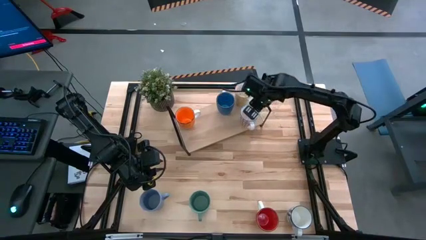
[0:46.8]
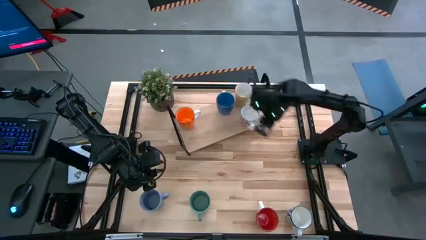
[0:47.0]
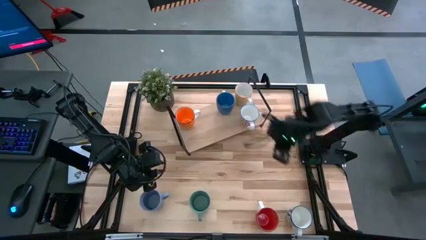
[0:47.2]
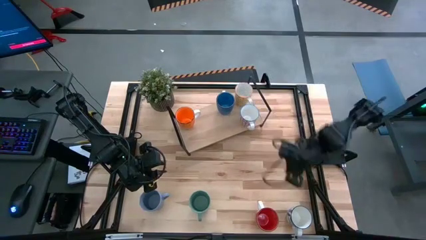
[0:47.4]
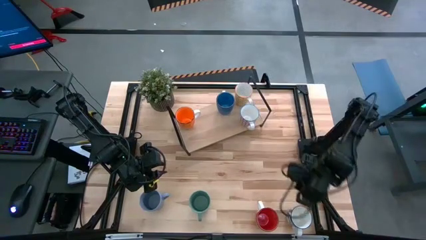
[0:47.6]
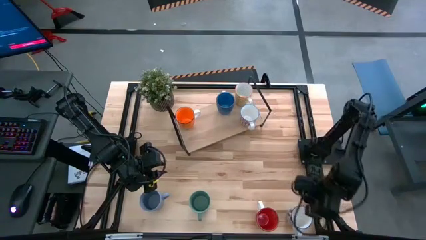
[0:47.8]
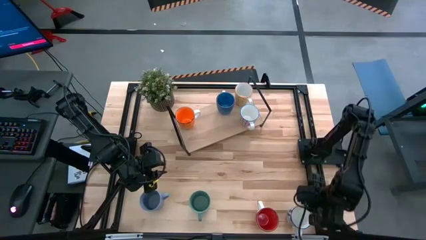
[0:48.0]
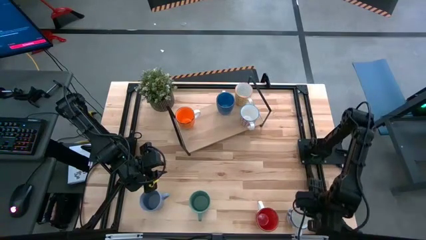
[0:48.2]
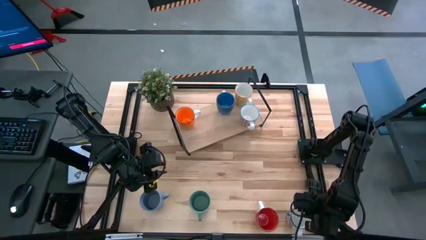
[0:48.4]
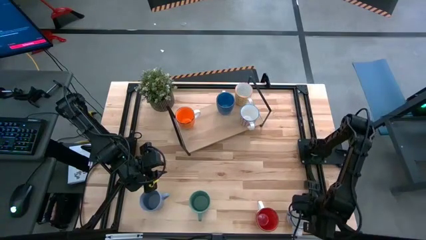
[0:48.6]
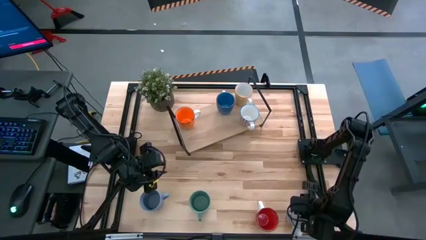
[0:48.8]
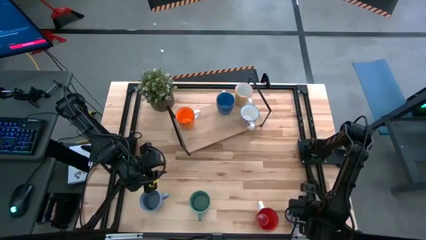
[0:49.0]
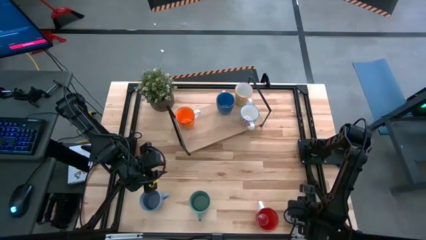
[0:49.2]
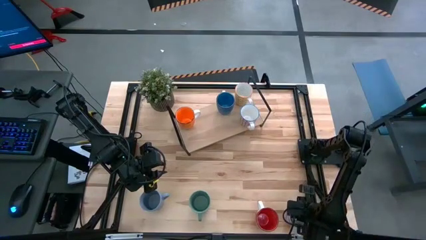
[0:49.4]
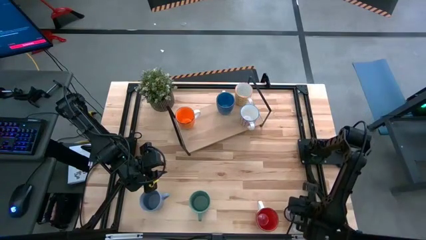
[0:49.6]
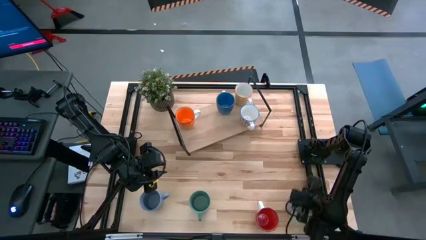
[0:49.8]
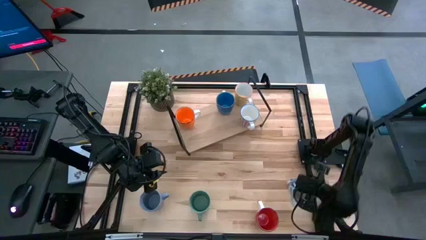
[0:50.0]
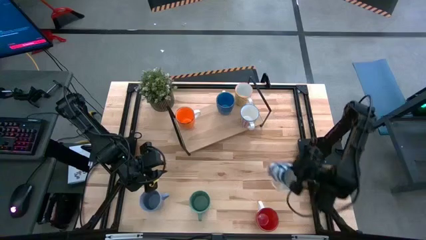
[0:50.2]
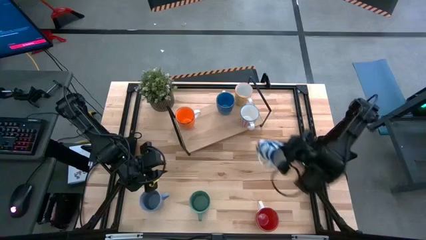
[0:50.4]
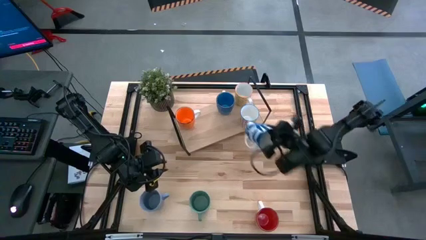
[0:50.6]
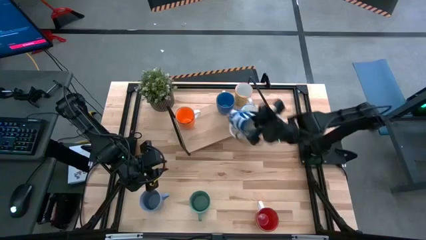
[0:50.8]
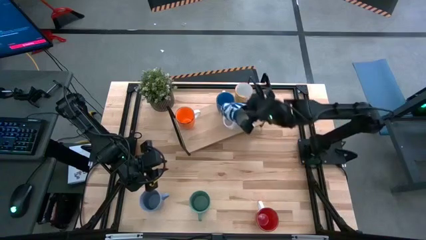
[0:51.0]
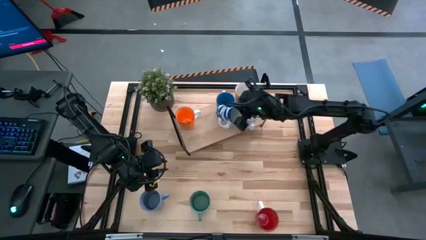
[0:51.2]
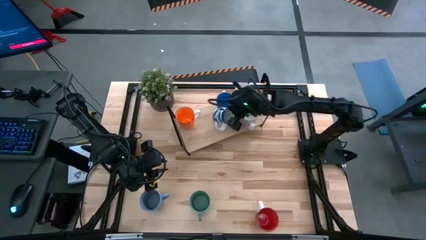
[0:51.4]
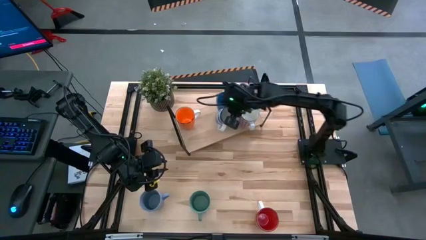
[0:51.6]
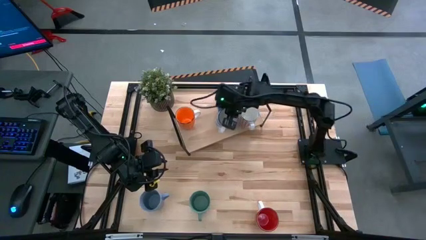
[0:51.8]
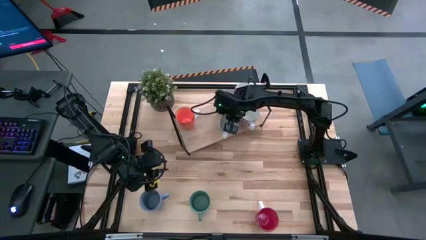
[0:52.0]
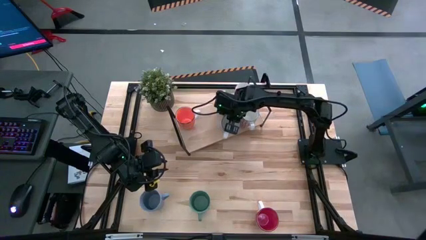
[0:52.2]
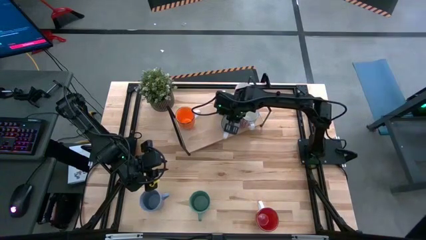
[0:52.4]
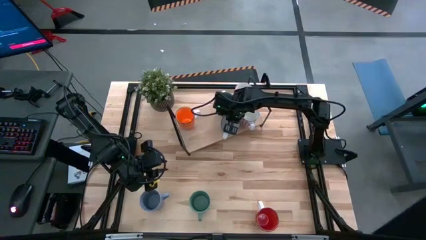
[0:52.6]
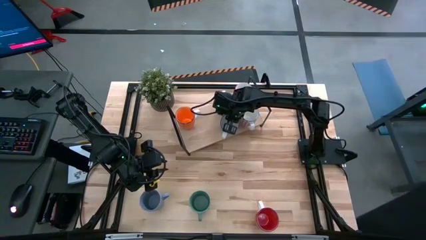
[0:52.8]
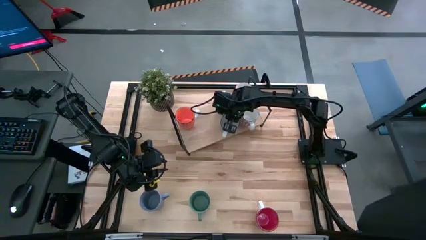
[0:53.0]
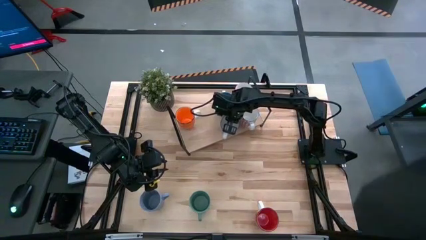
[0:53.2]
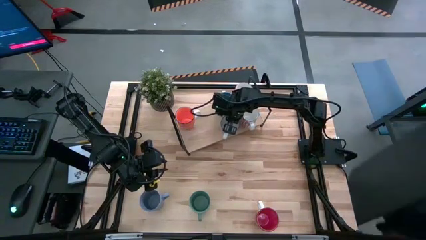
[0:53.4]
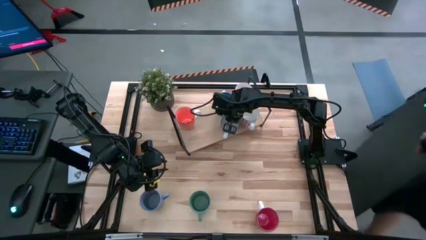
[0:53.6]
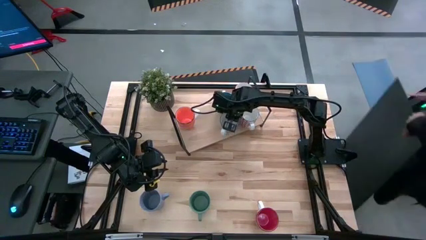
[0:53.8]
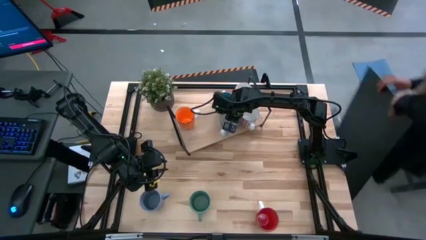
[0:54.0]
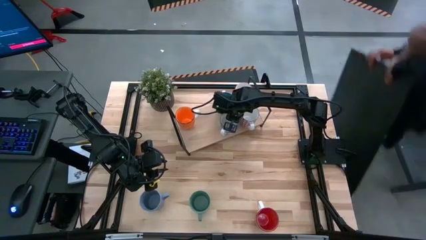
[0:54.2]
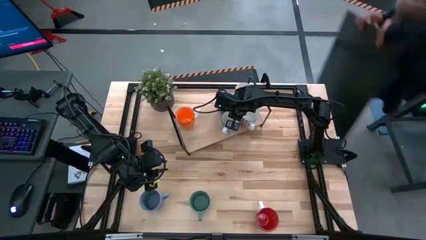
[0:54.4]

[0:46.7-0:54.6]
Task: Place coffee mugs
Put the white blue mug on the shelf

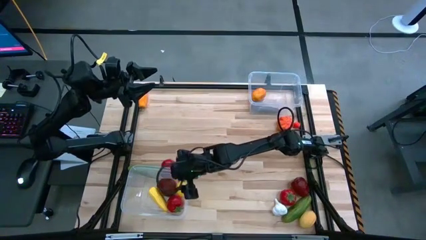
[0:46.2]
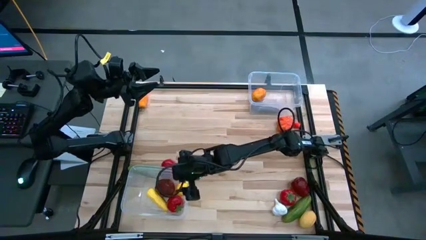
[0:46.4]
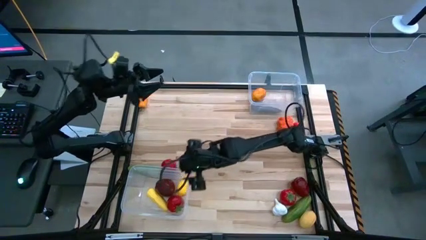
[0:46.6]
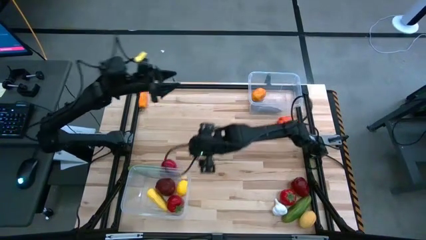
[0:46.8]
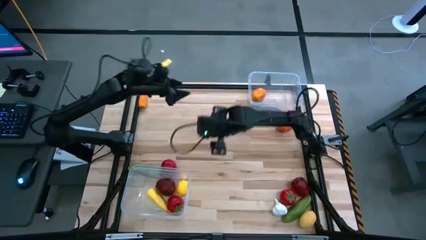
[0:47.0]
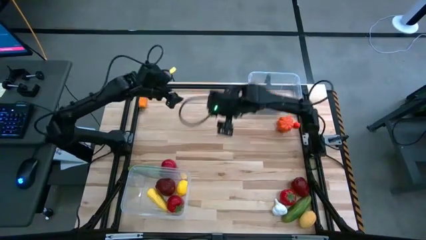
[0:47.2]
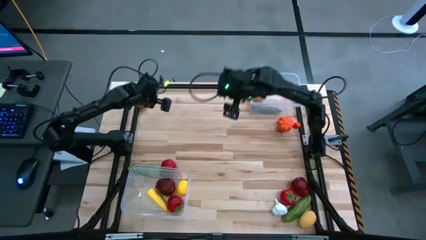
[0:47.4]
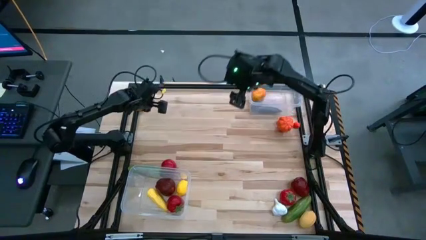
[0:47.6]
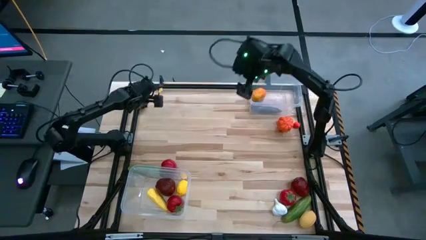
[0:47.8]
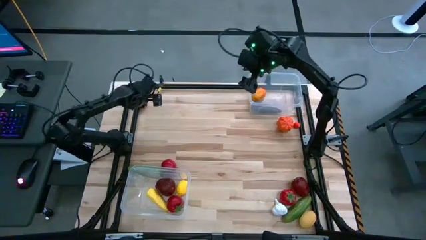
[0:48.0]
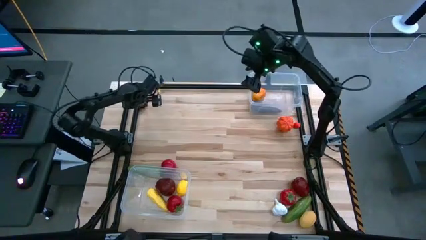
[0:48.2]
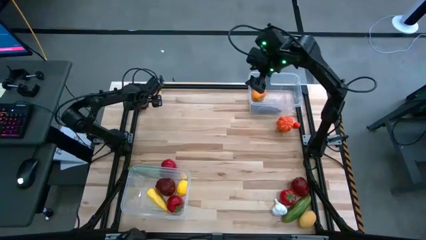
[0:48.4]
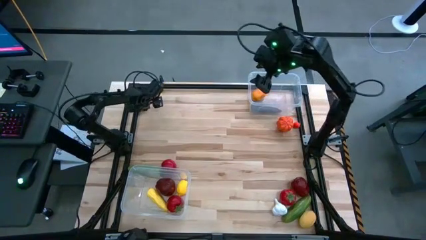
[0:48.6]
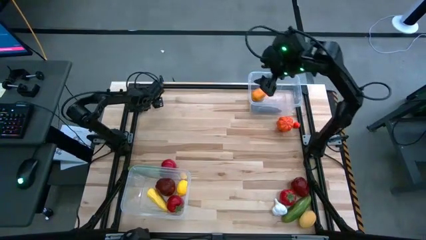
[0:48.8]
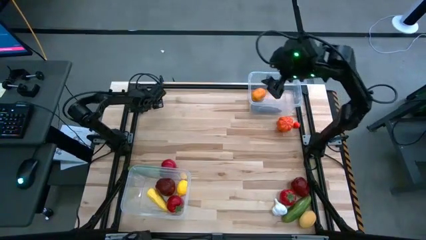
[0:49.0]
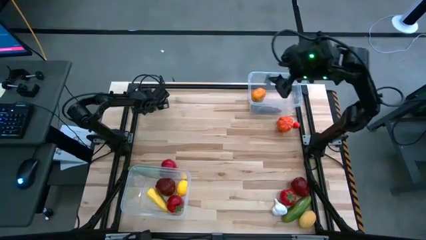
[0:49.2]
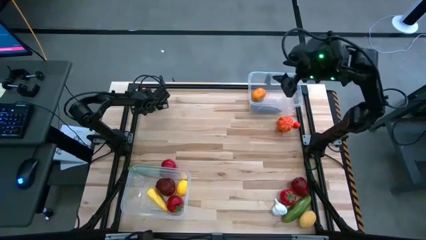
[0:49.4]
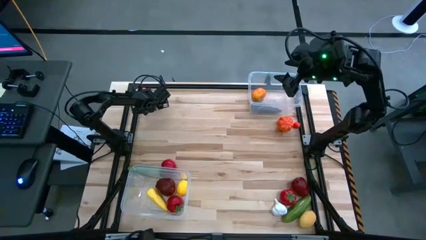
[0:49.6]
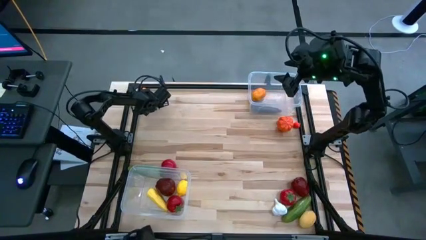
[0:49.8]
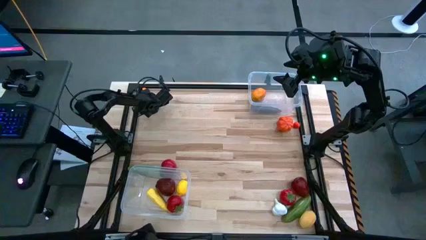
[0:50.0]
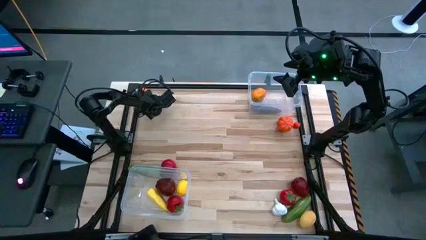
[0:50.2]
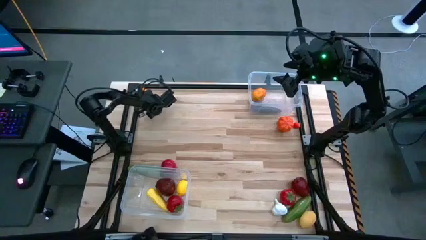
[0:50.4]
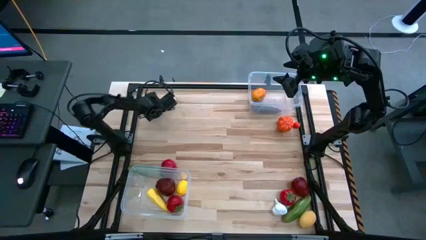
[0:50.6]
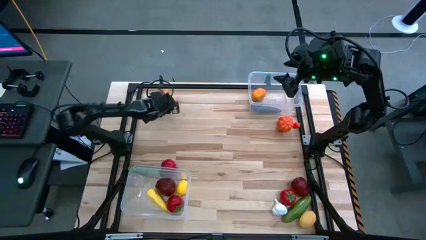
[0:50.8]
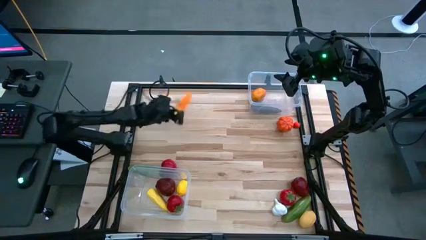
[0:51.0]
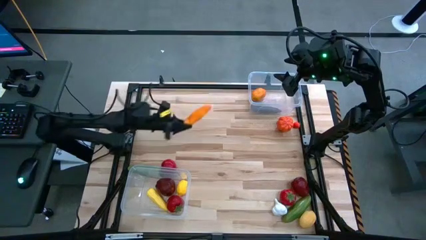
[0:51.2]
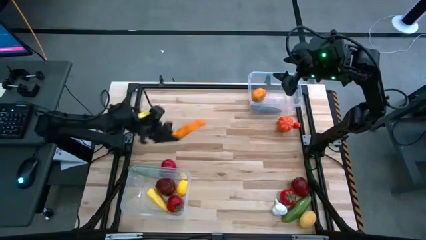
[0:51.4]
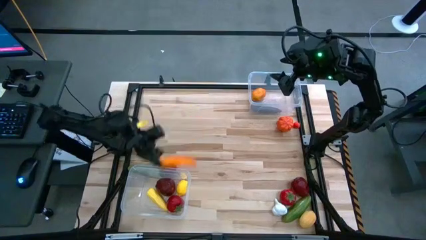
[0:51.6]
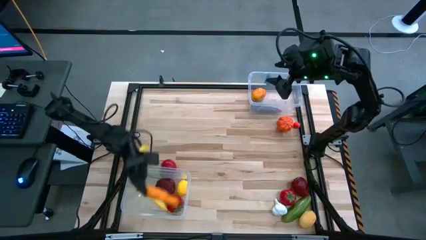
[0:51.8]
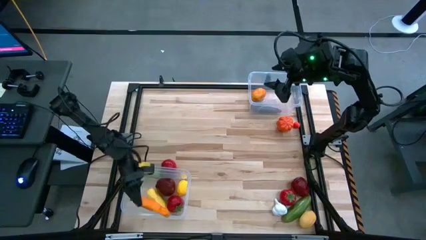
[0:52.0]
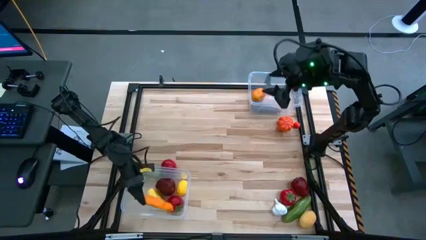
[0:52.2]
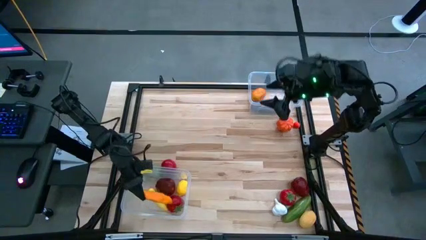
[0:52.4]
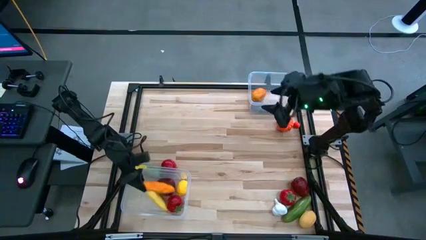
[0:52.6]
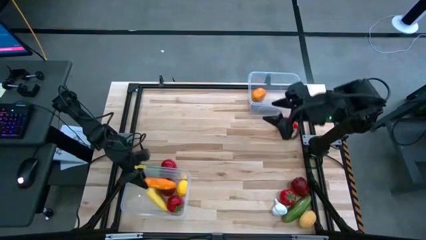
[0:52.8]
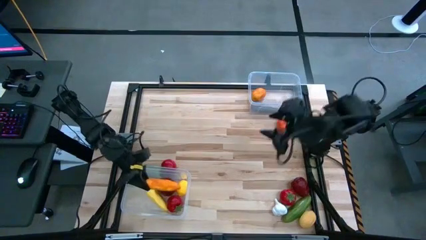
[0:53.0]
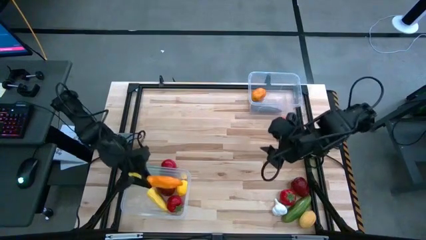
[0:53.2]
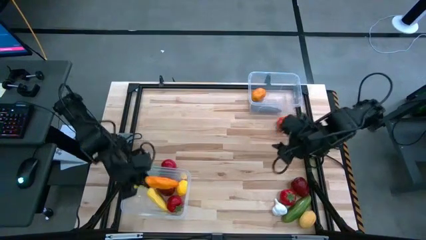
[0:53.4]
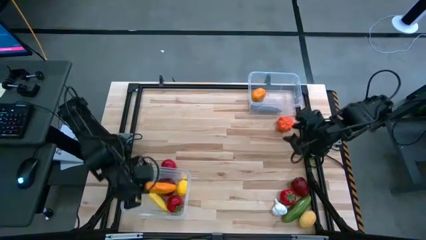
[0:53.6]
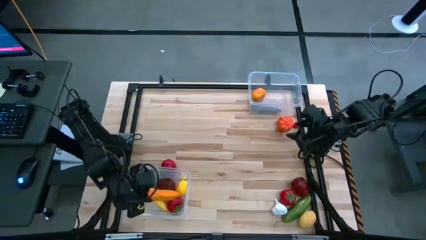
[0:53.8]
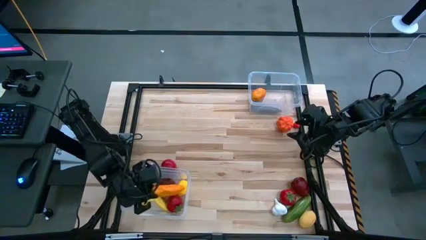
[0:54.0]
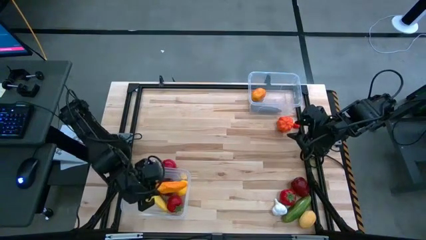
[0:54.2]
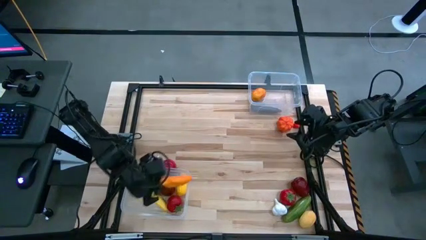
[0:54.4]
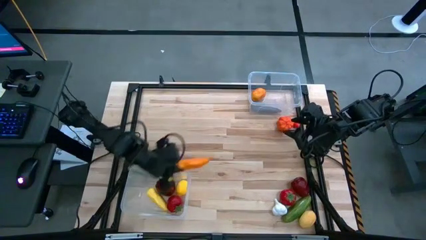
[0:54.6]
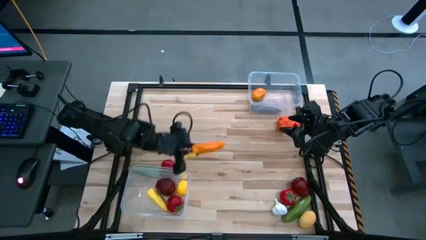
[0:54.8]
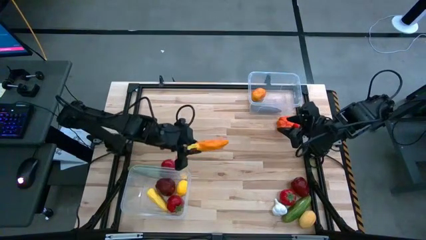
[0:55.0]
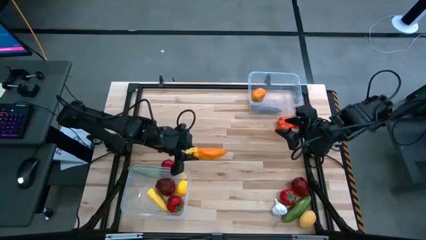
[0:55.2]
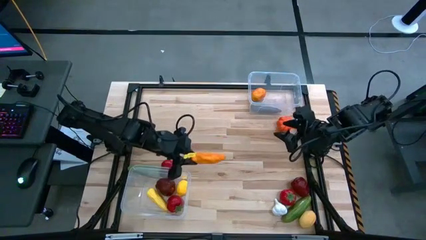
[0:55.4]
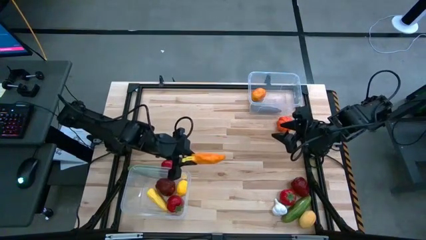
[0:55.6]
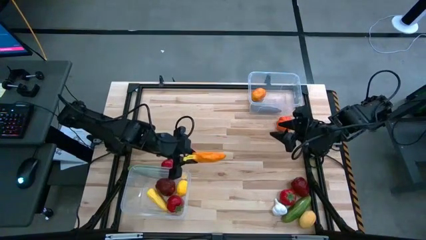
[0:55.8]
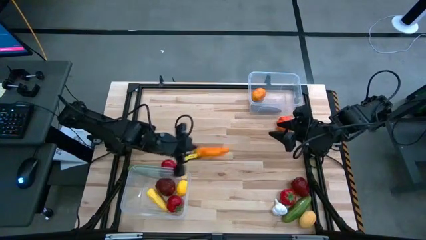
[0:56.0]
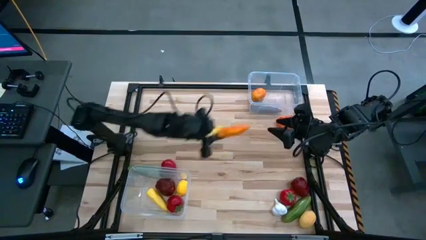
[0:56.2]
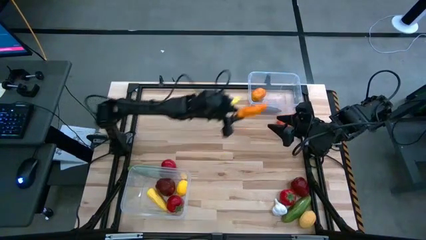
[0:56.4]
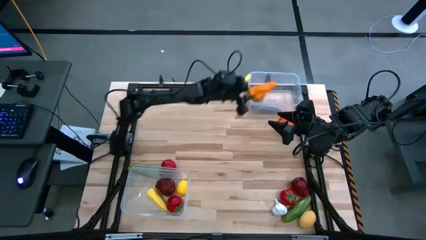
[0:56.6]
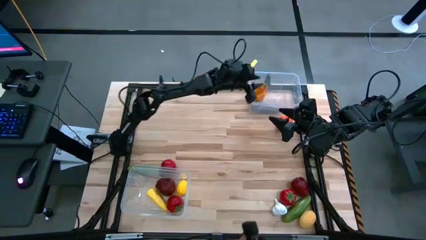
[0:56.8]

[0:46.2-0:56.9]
Task: Sort produce into baskets
Put the orange chili pepper into the top transparent bin
